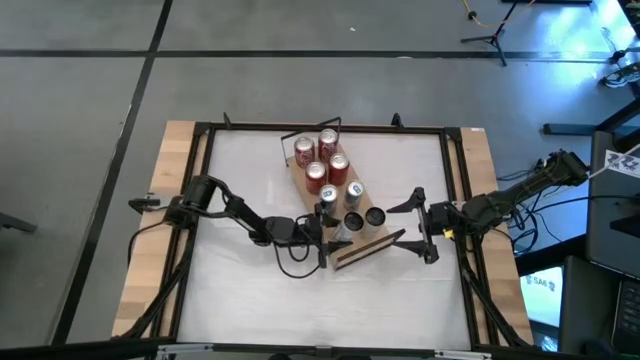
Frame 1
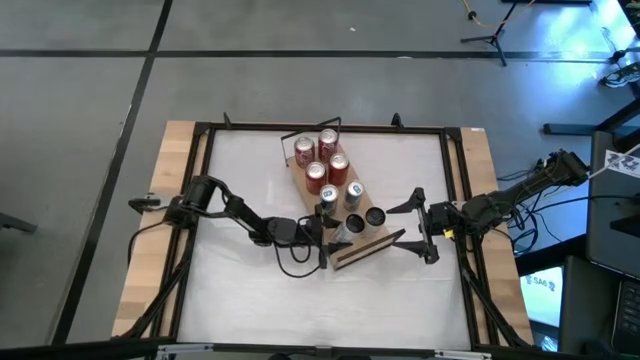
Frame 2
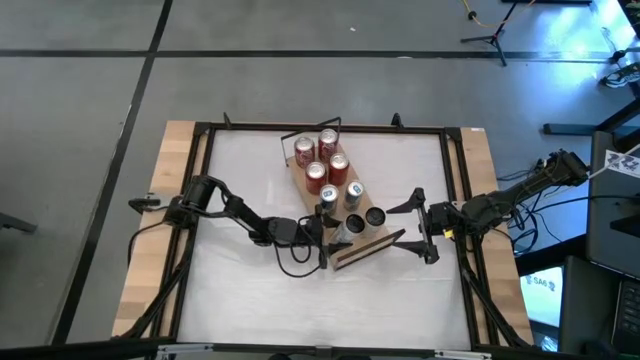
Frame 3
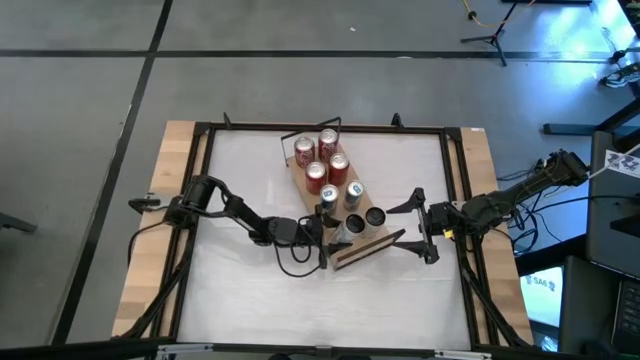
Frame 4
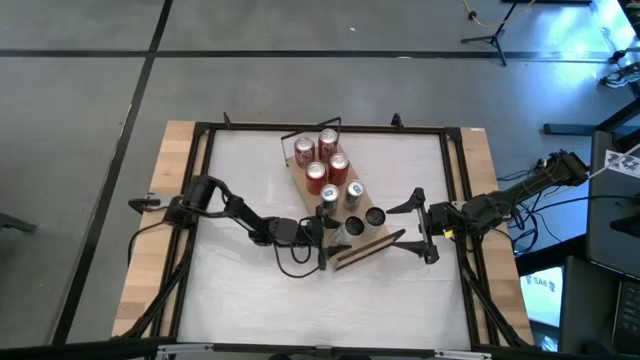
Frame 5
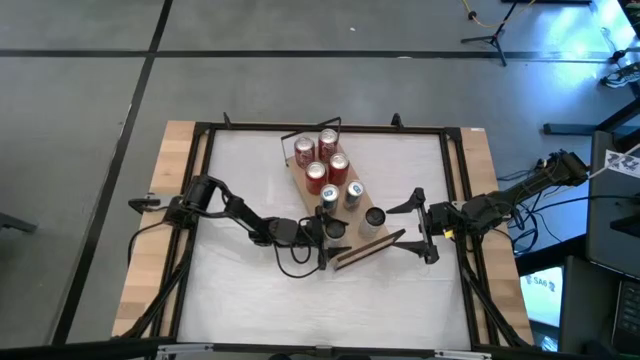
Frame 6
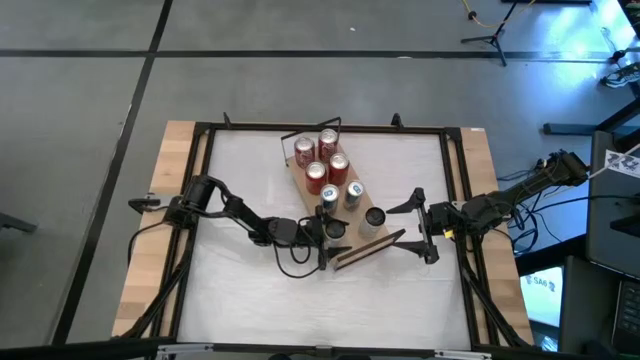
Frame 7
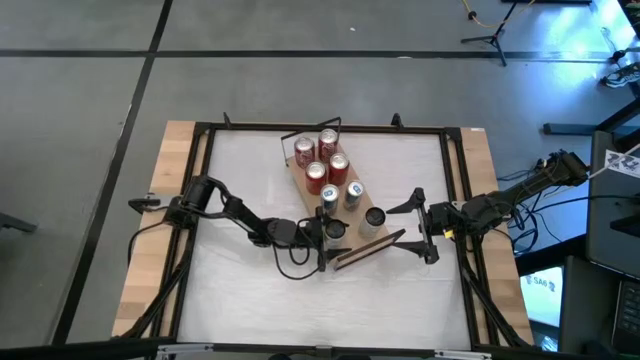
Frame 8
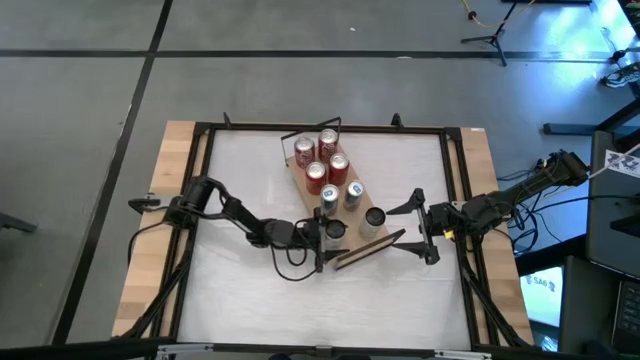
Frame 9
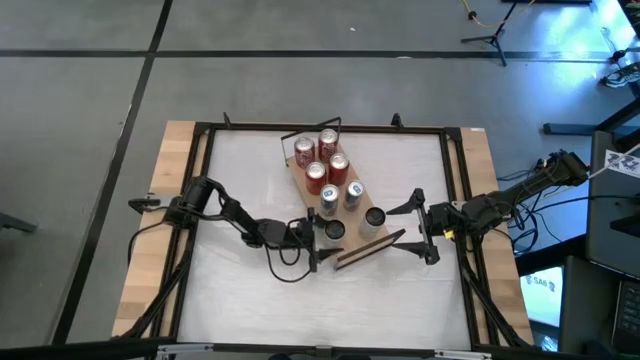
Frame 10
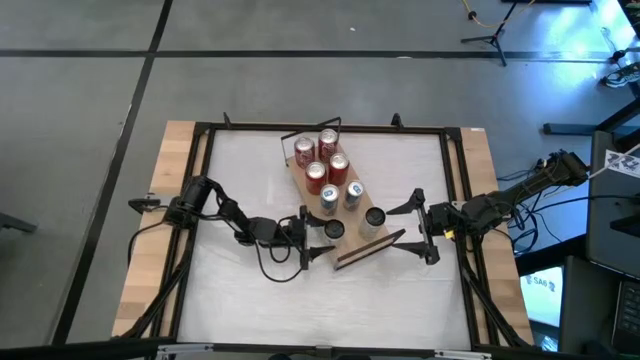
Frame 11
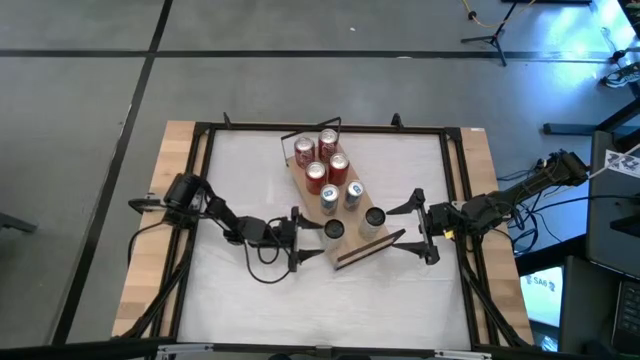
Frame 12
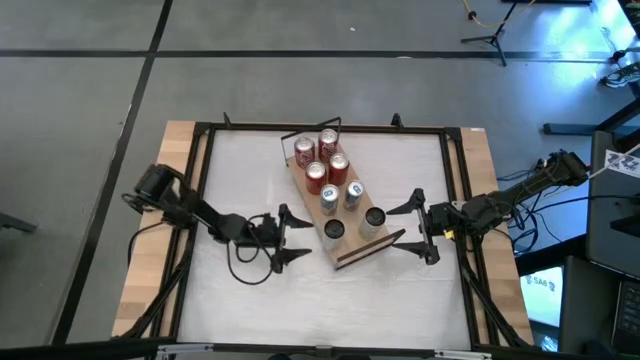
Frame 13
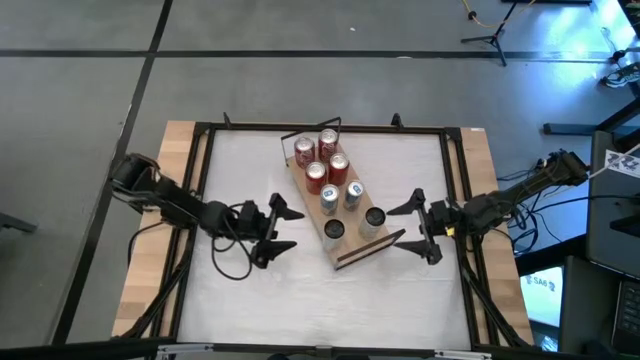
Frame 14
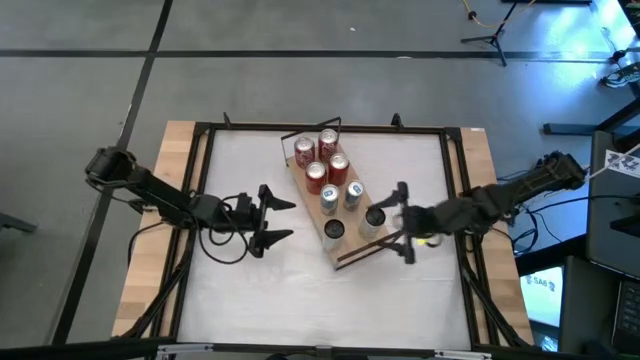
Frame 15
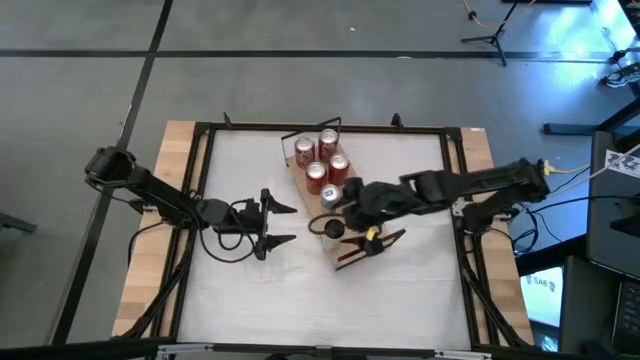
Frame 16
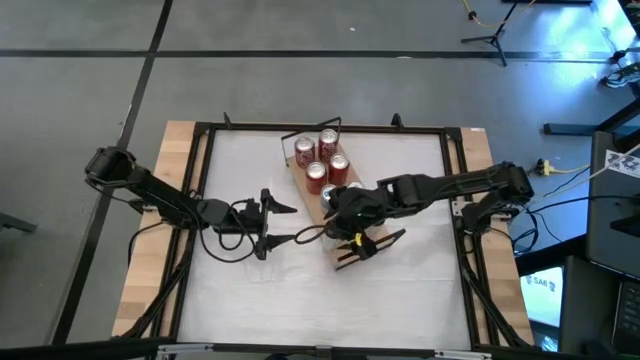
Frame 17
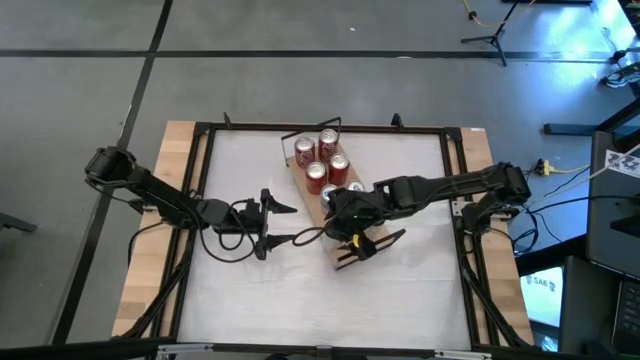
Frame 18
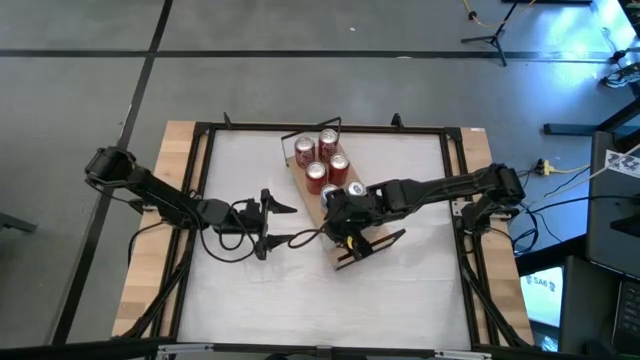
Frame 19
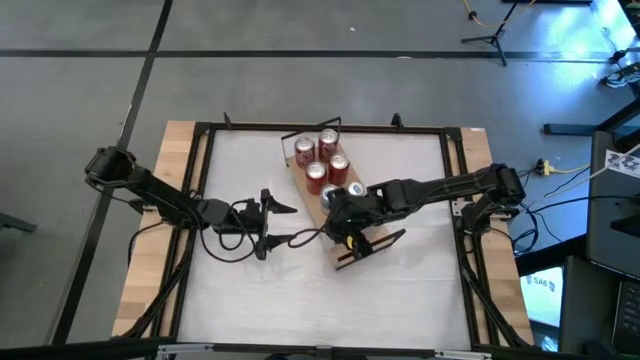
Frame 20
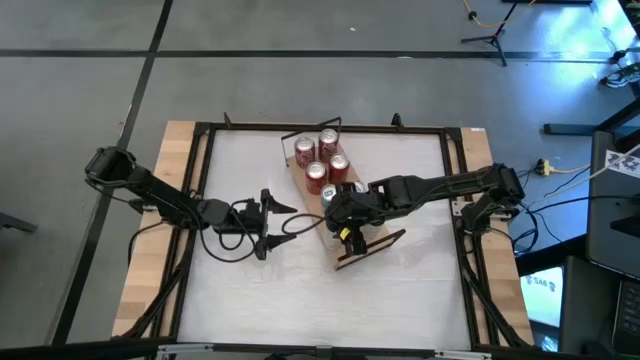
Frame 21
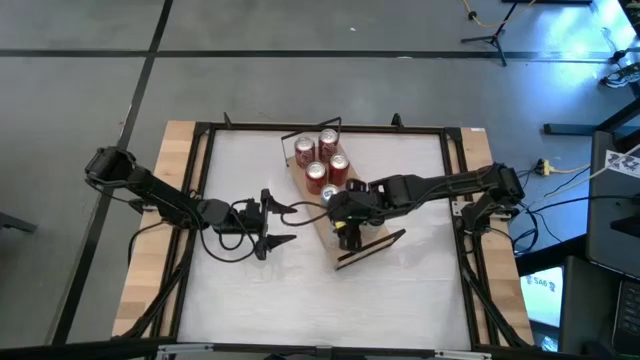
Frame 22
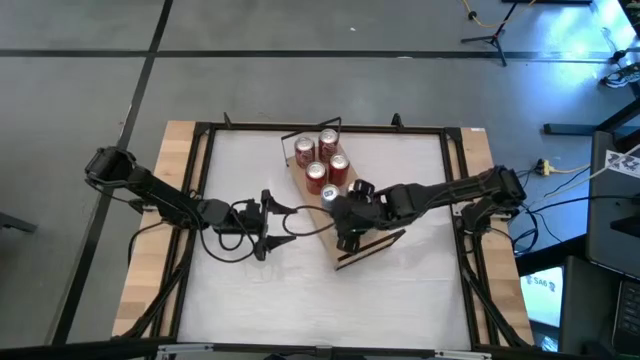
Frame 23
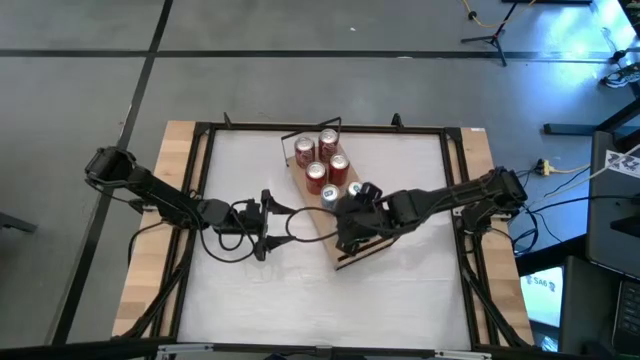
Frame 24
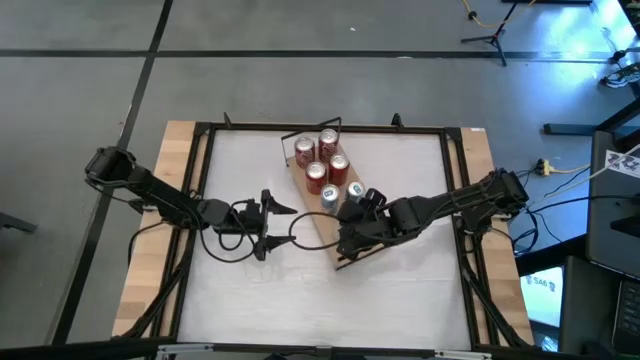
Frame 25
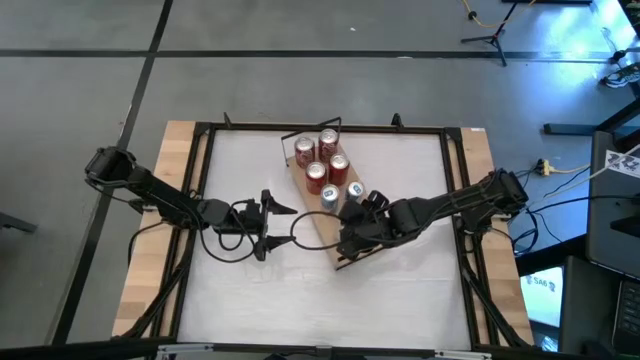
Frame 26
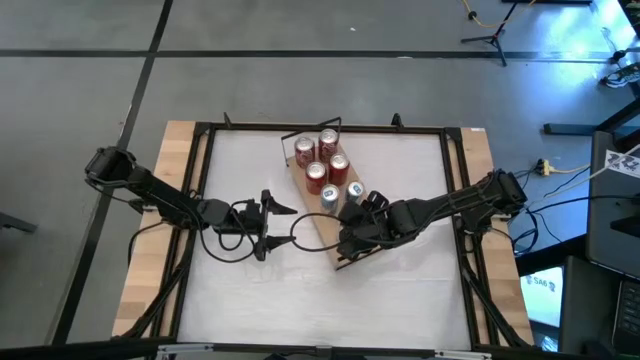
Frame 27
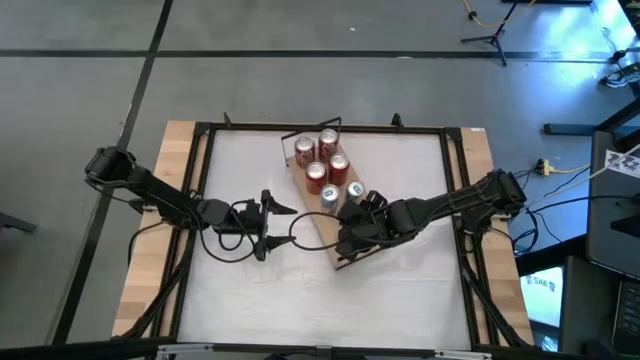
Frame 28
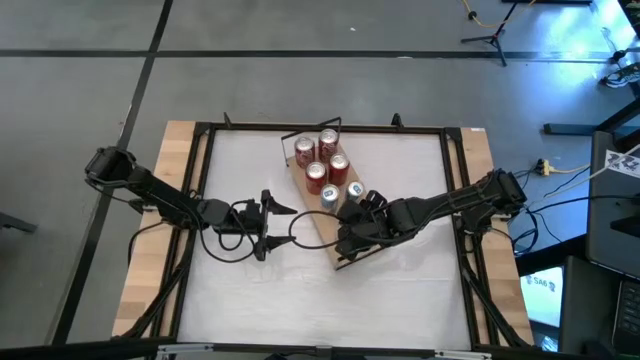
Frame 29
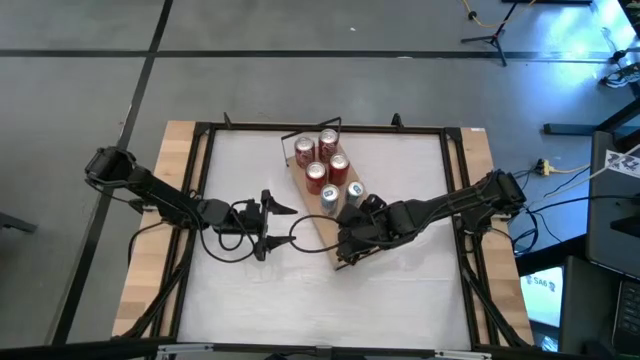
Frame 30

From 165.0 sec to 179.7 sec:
Task: Place canned beverage on shelf
Put the white yellow soda can on the shelf aligned with the other white yellow soda can

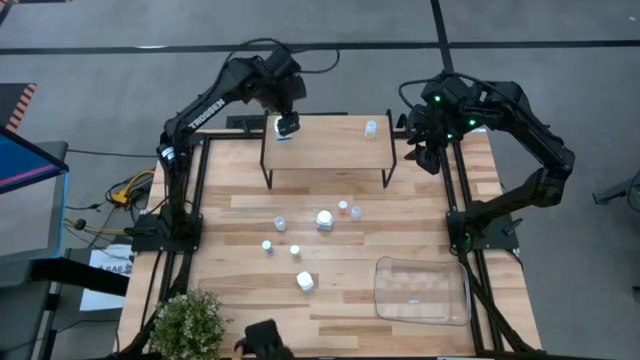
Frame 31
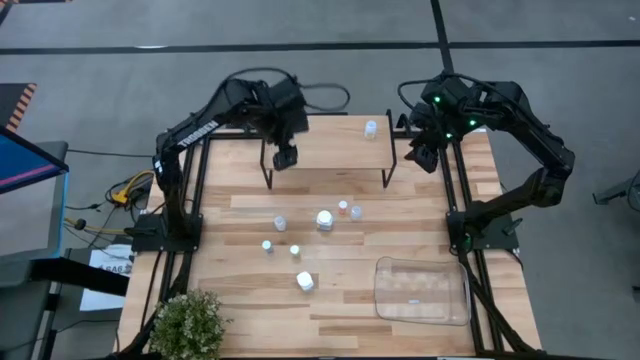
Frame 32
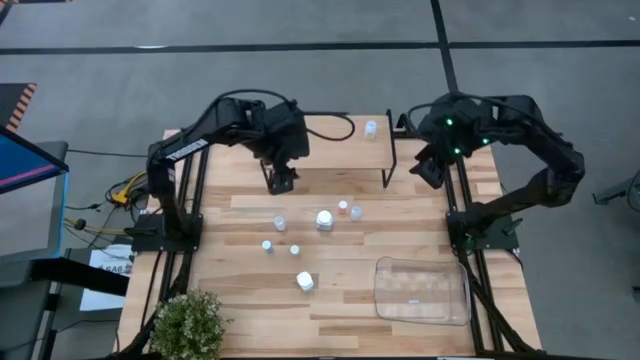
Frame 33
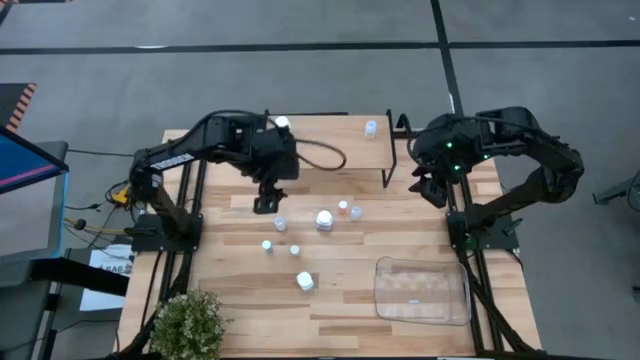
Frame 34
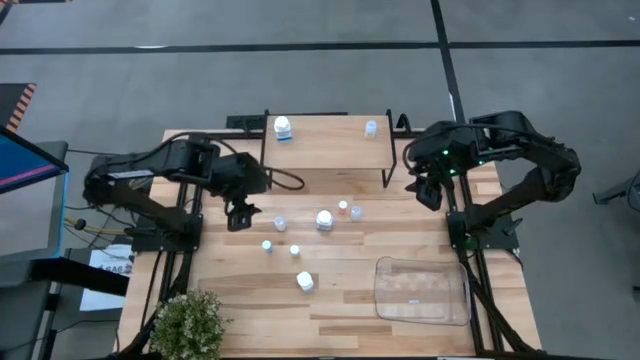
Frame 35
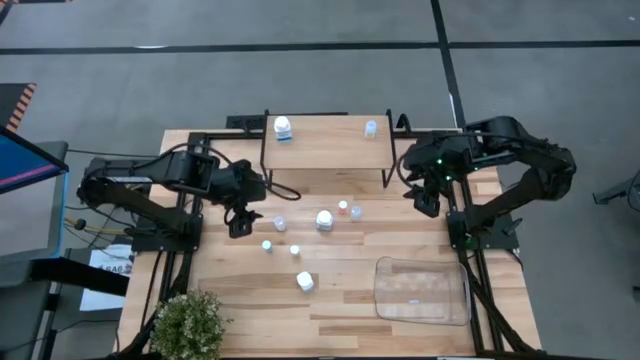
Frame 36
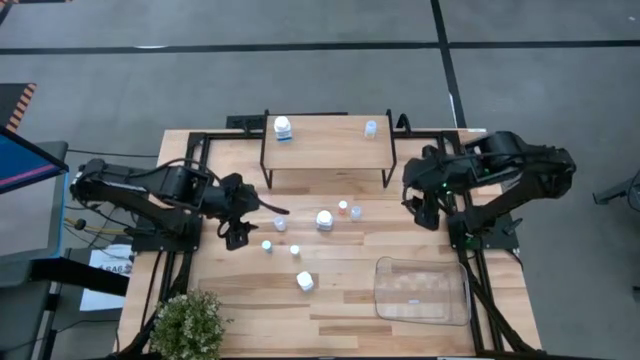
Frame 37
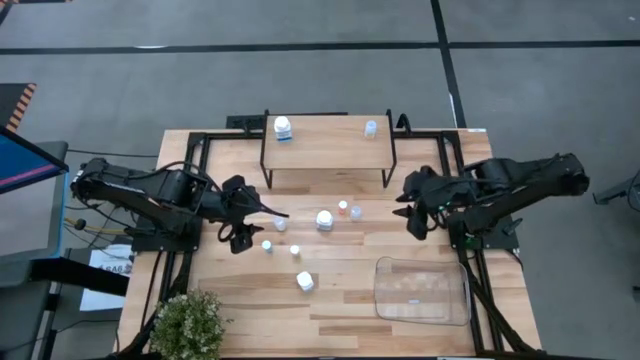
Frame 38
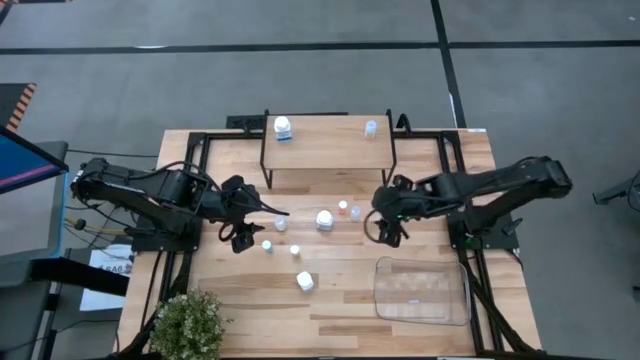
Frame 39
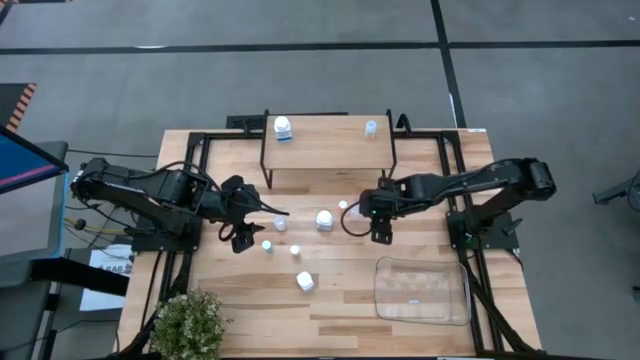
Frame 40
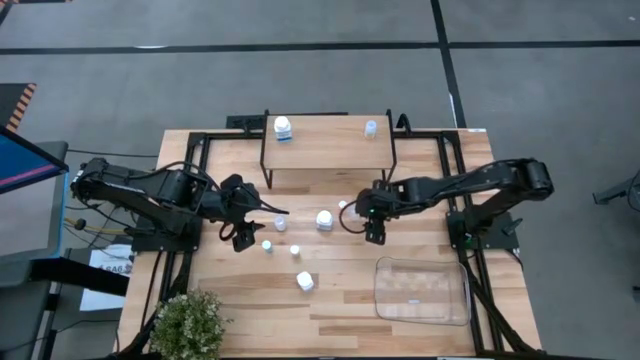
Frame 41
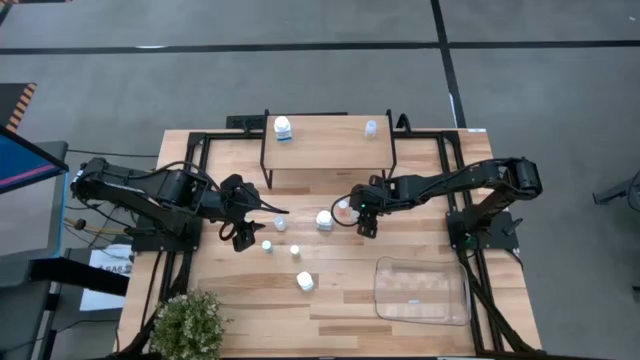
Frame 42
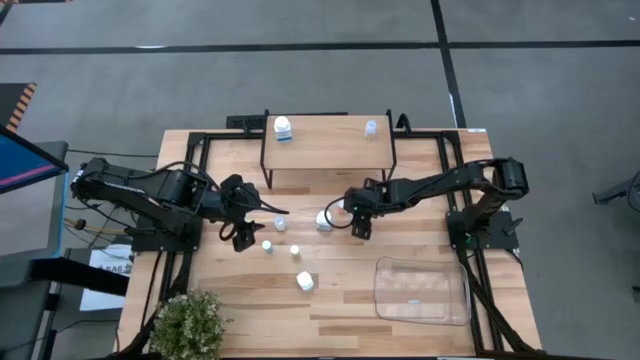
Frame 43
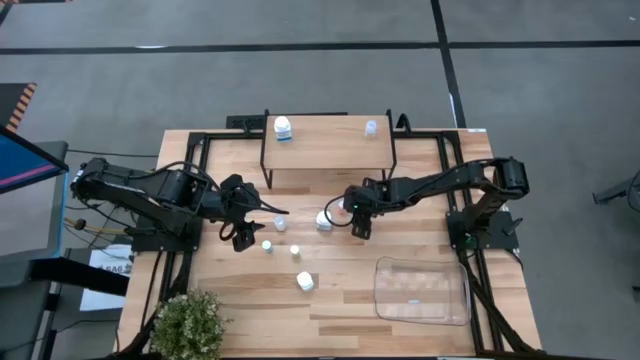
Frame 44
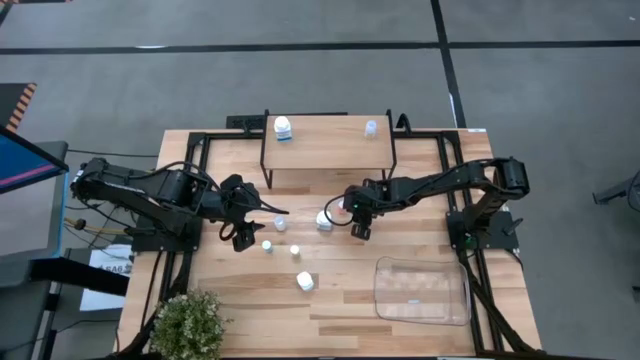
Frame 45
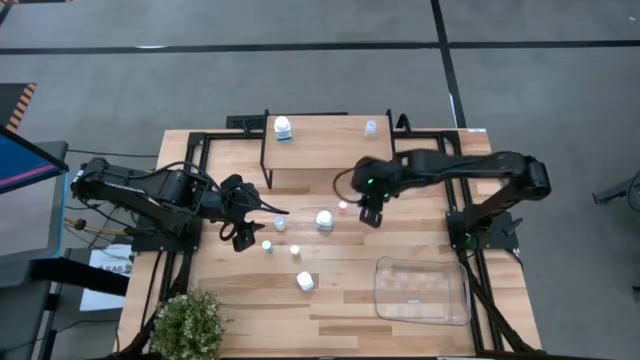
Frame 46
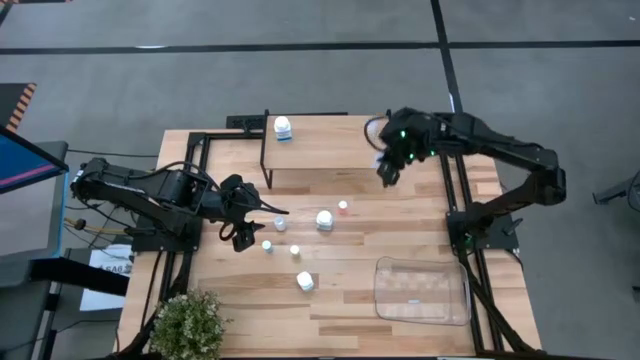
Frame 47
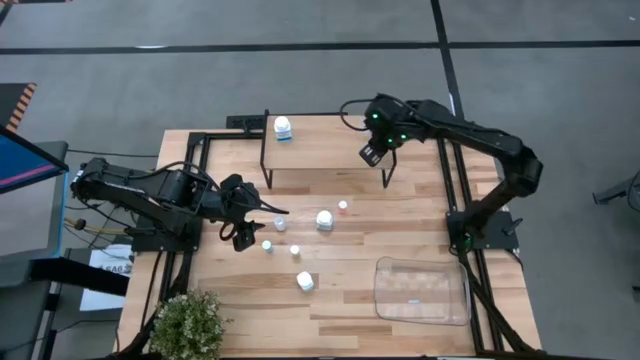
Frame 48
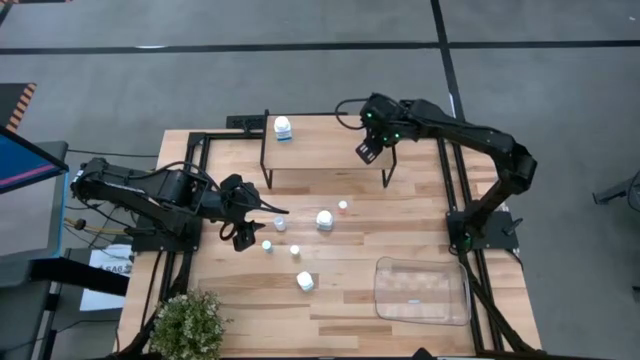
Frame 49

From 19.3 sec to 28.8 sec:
Task: Pick and place medicine bottles onto shelf by color
Put the right transparent pill bottle on the shelf aligned with the other transparent pill bottle
